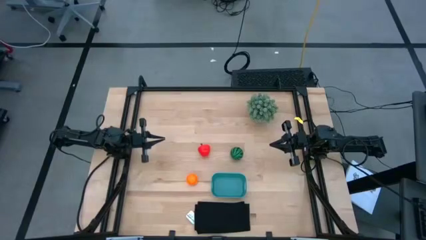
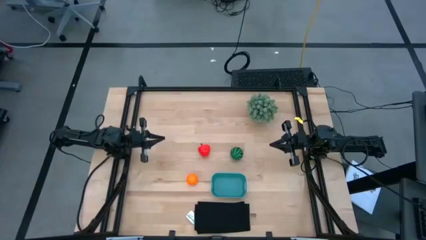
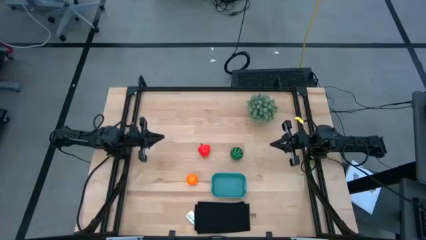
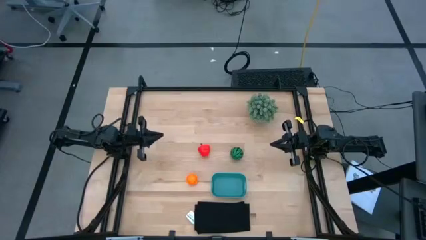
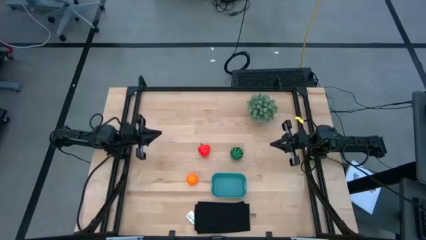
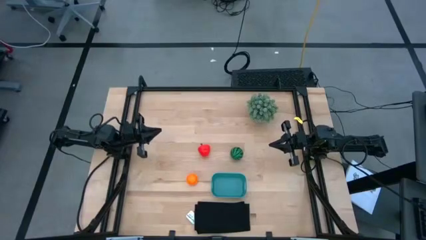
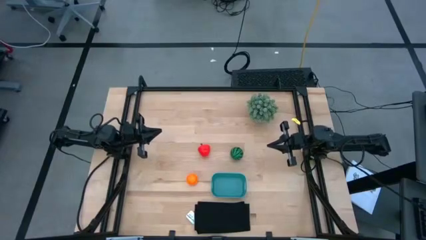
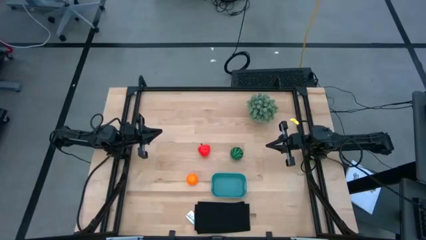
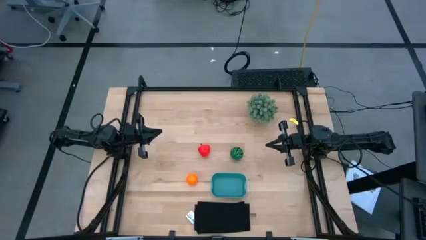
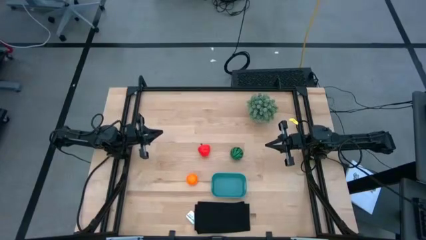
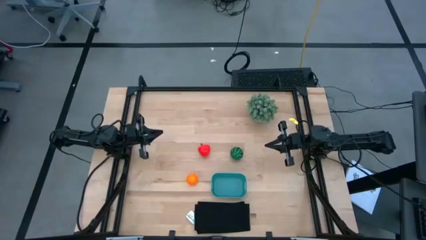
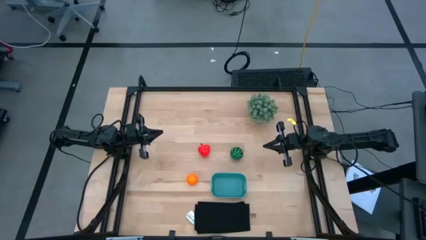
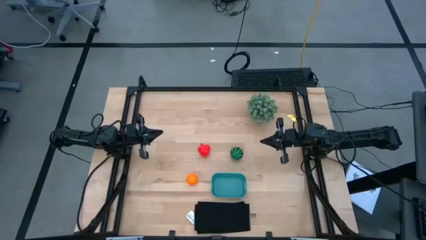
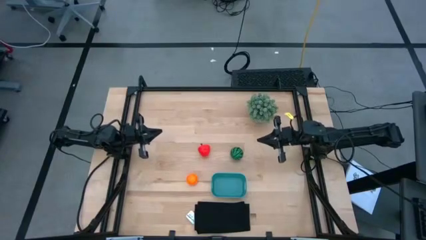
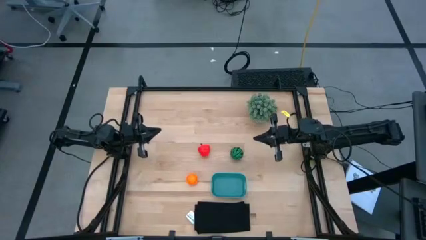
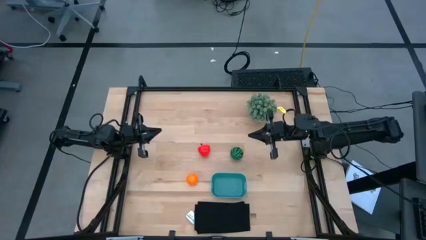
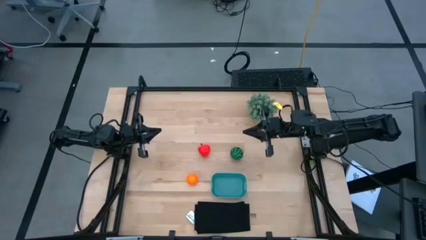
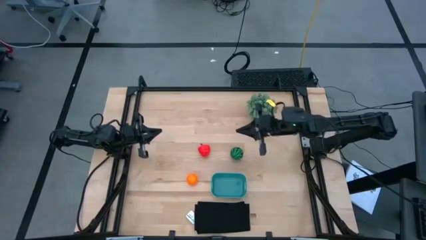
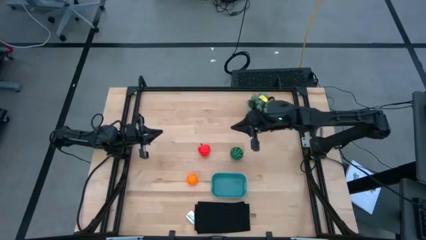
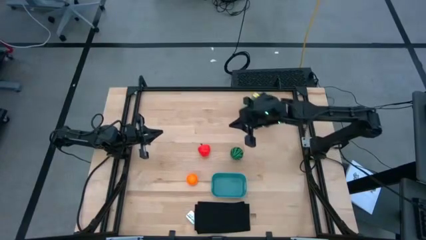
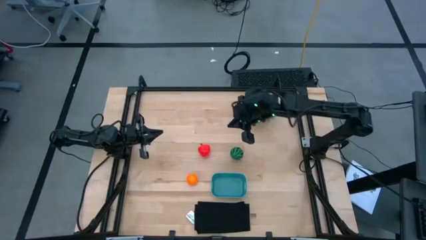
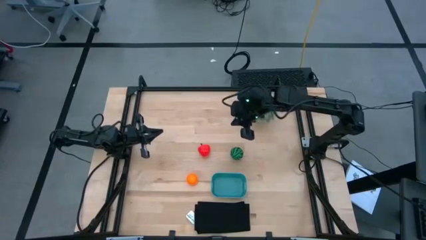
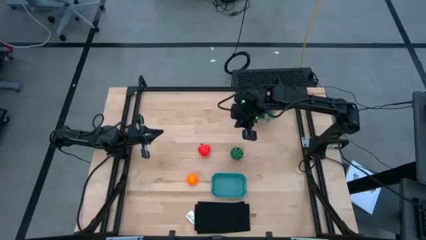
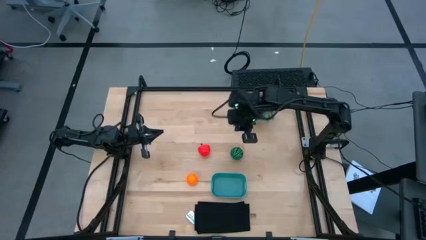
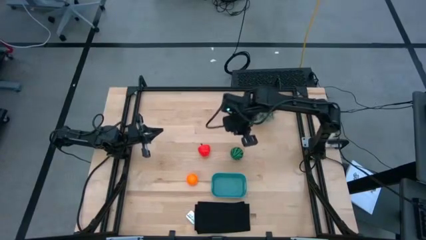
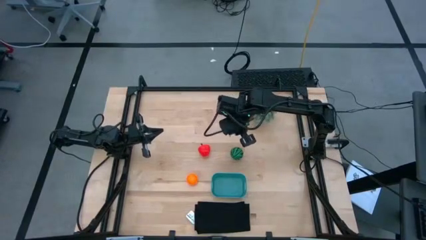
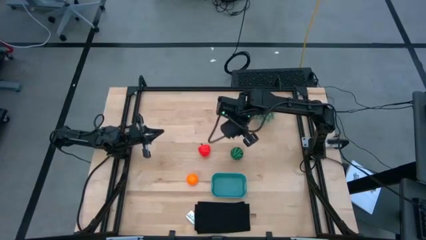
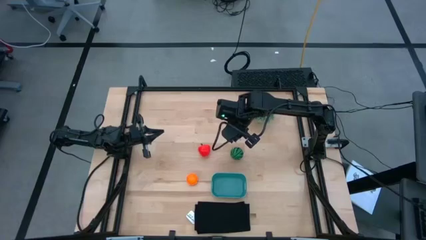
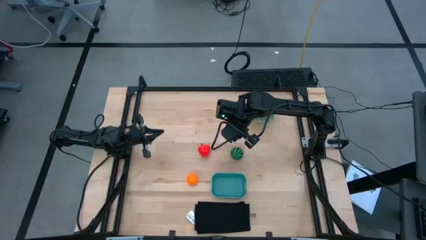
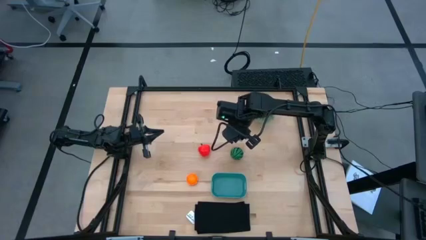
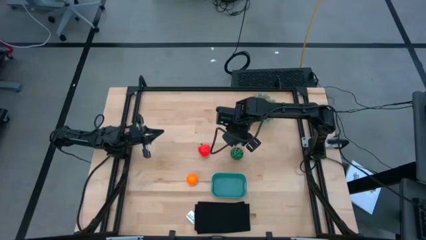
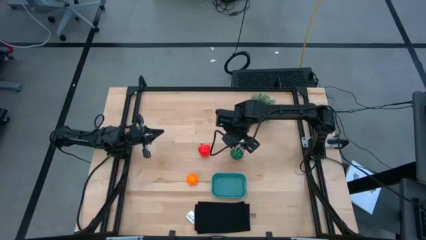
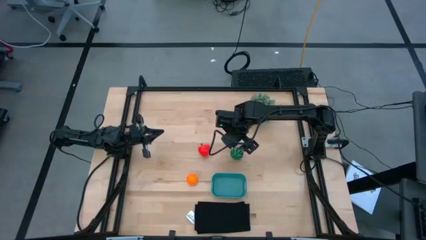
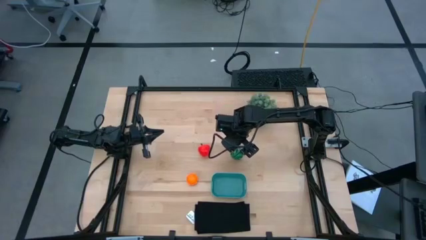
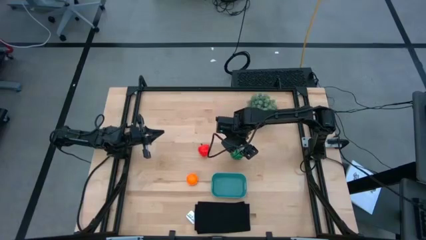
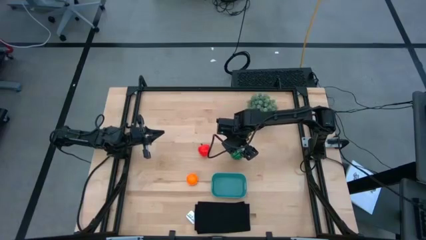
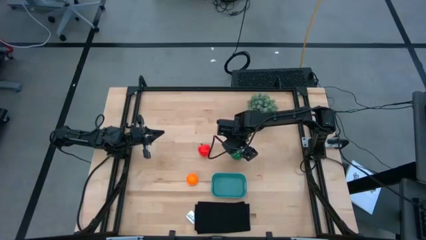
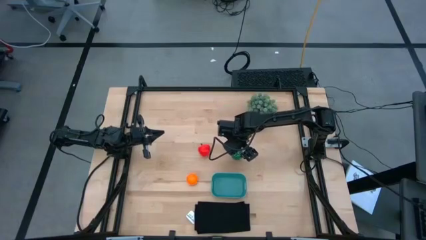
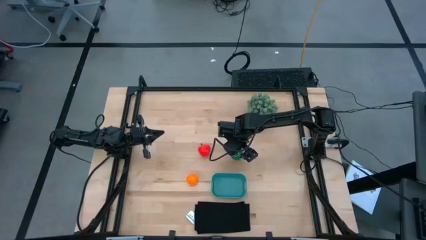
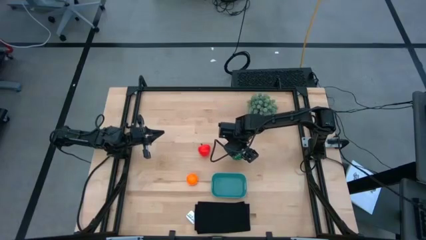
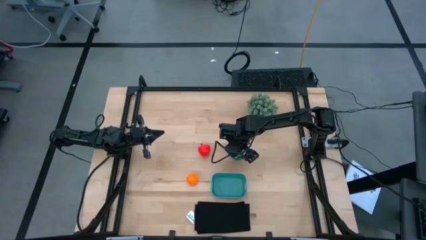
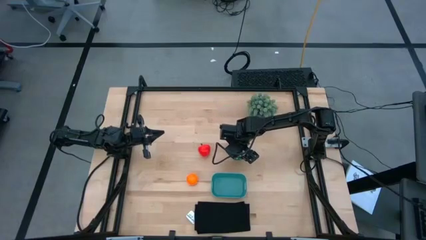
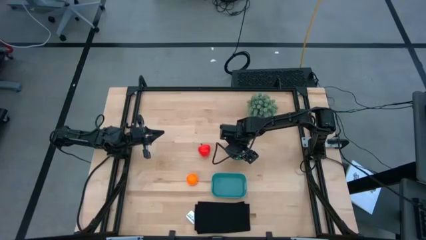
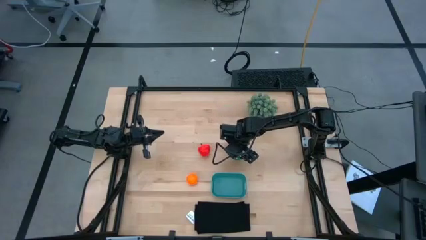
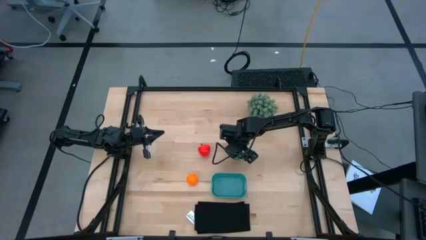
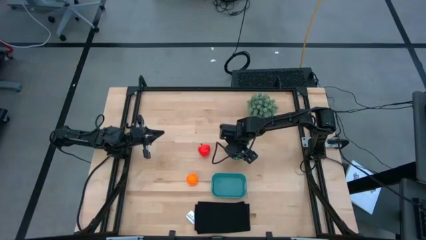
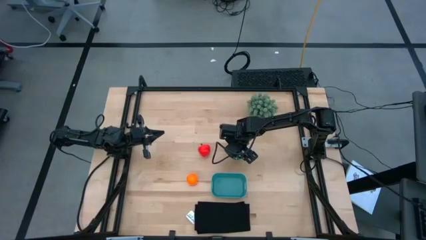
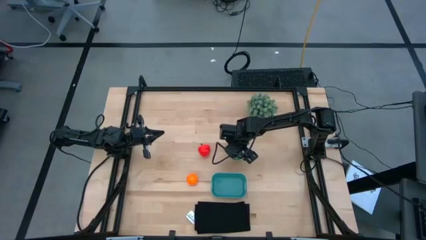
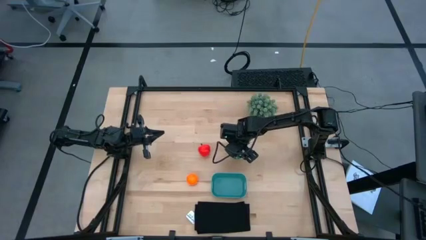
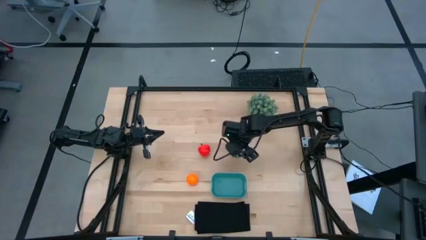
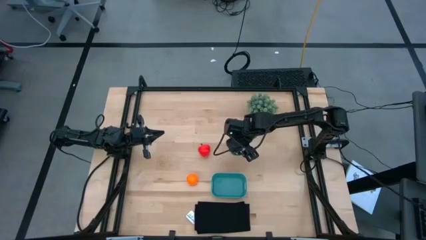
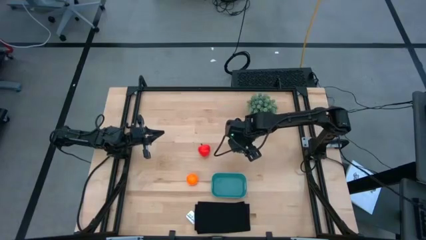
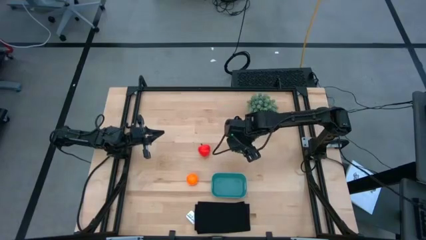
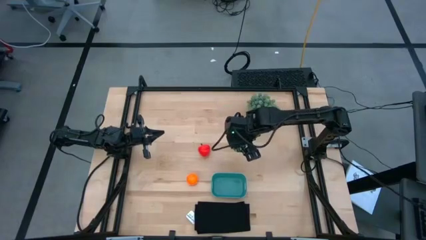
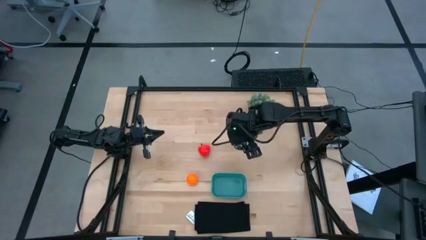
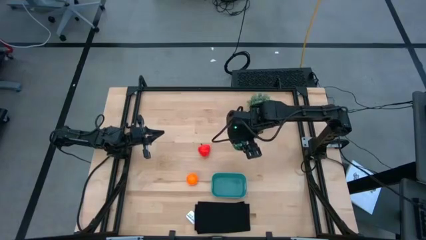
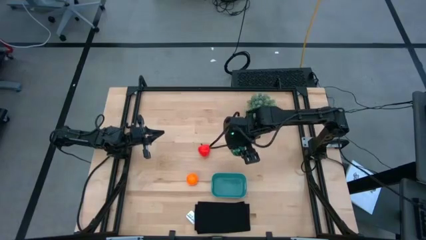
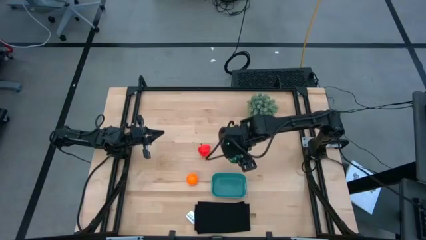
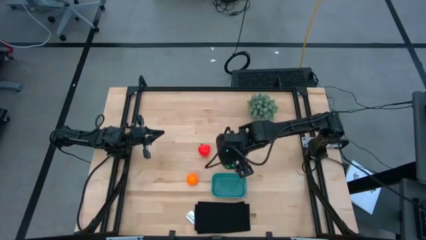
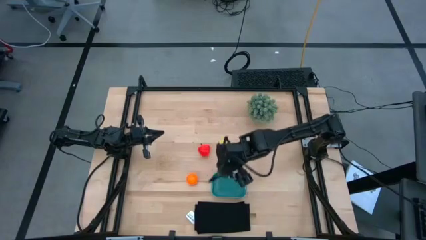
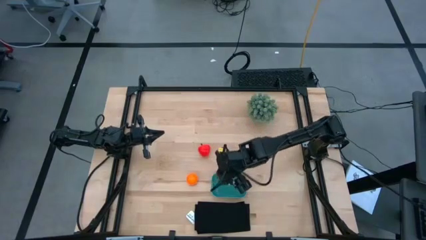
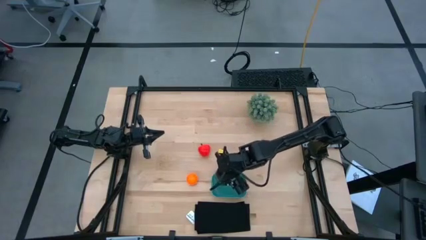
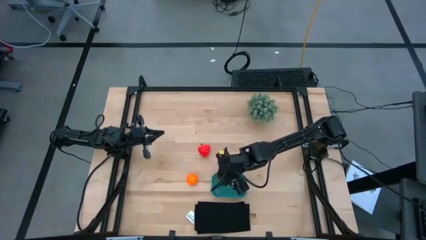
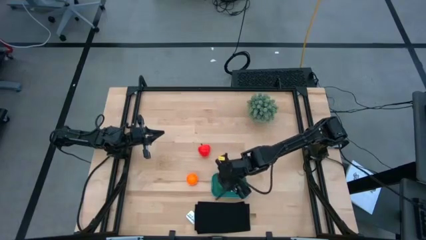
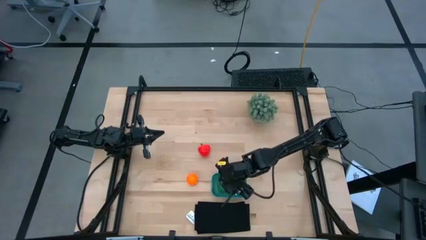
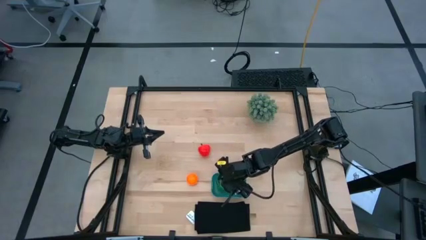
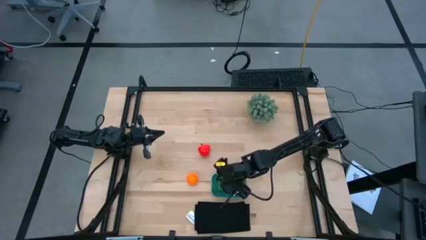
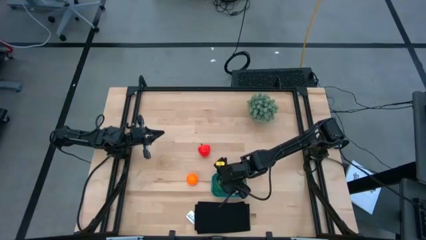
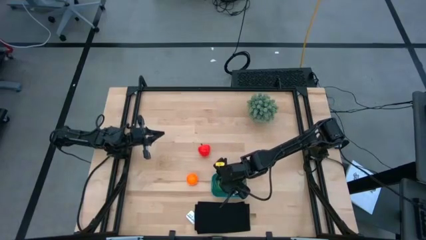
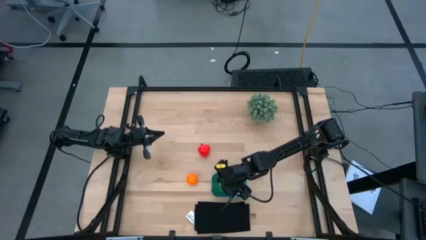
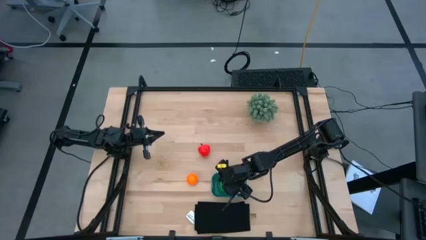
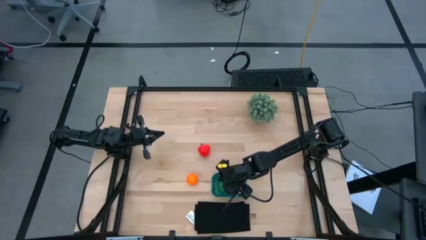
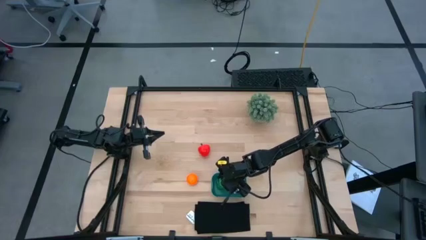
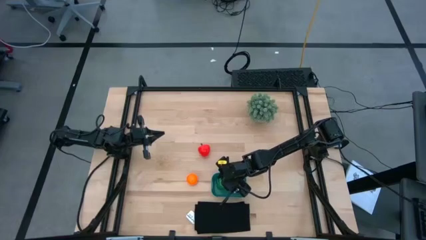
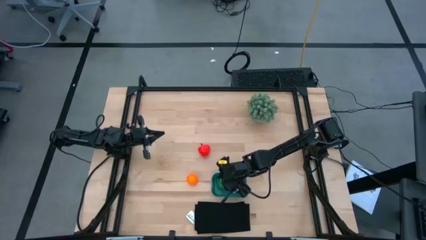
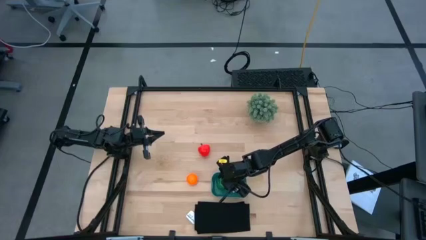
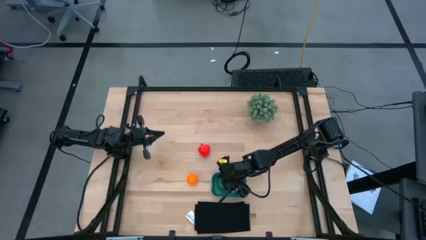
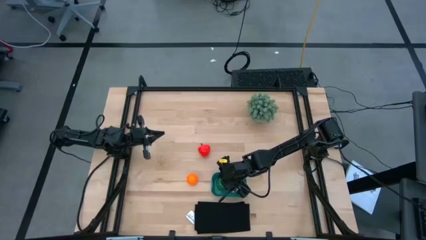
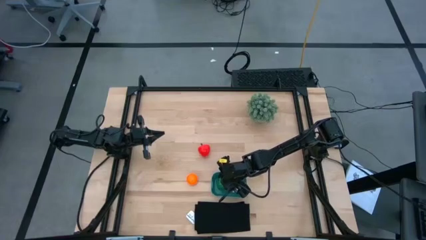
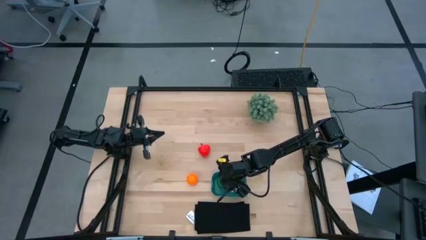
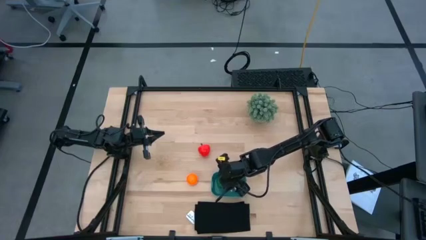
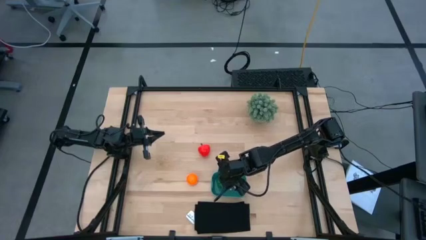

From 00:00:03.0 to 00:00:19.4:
Task: Pick and placing Produce into tupperware
Put the watermelon toy into the green bin
